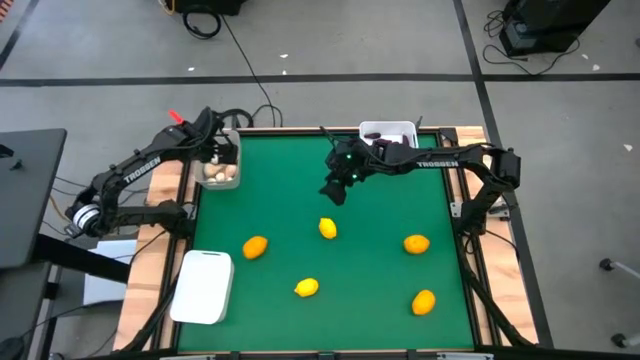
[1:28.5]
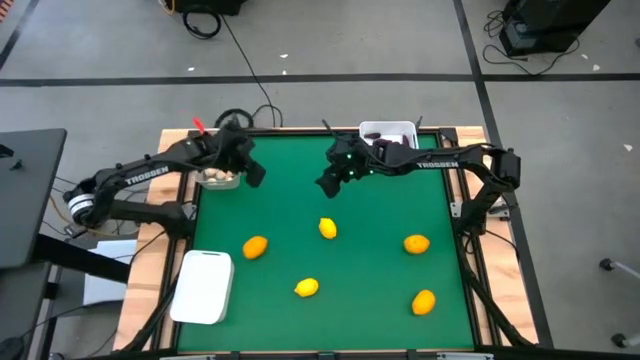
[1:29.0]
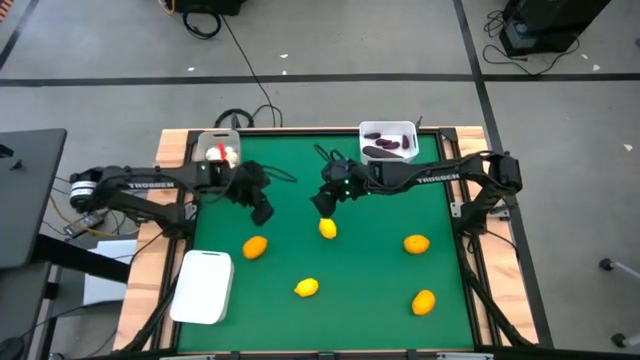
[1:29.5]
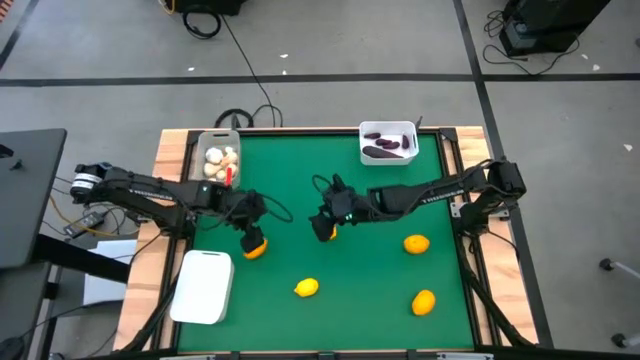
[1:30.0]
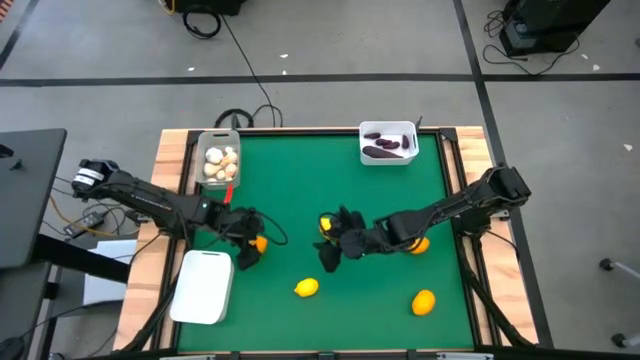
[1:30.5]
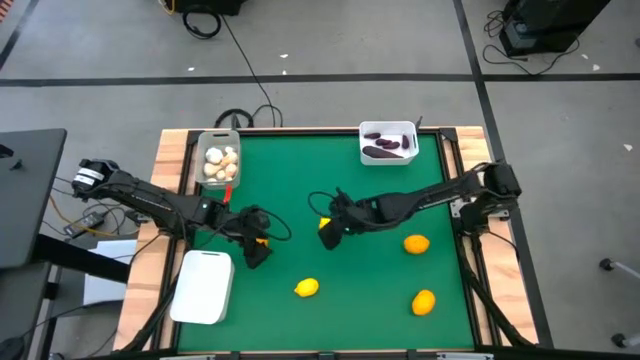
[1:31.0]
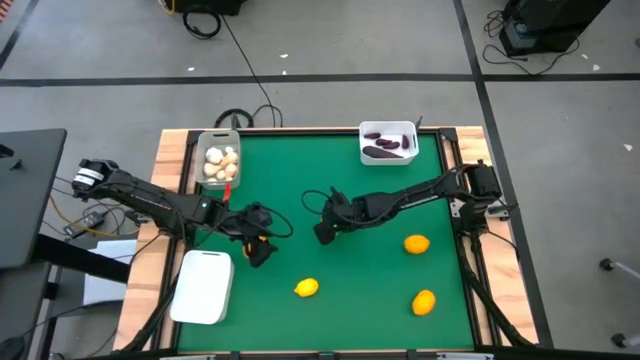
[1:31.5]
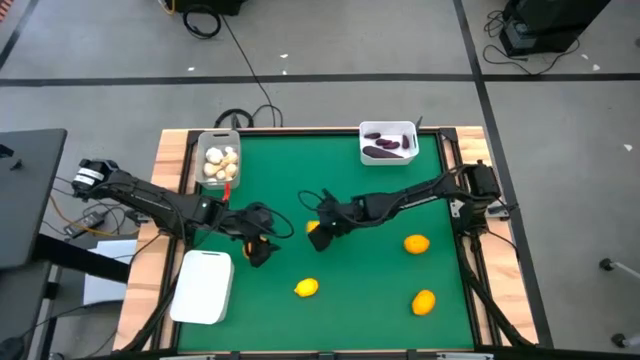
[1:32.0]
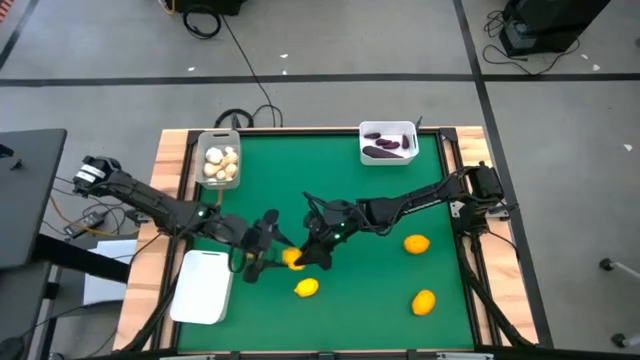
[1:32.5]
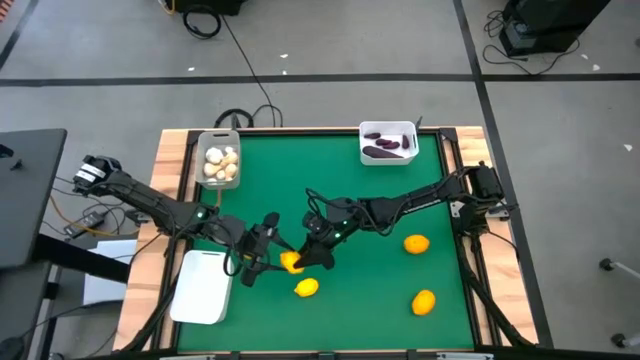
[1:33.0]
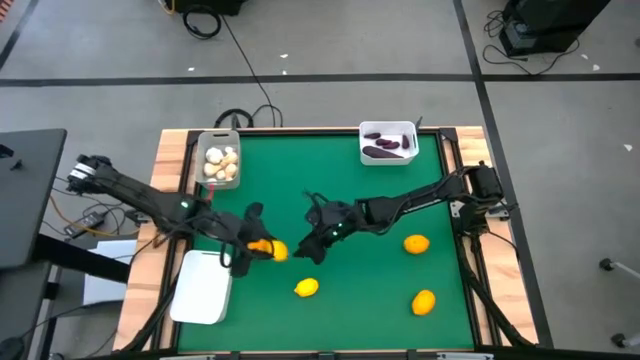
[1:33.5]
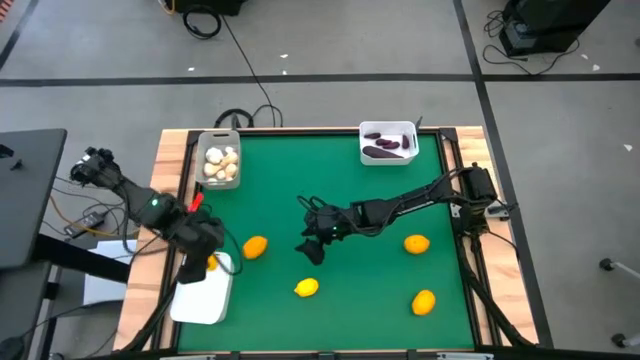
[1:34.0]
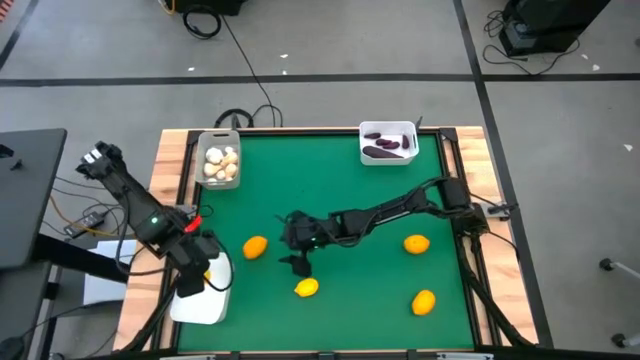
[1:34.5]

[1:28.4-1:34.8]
Task: Sort produce into baskets
Put the lemon into the bottom white bin

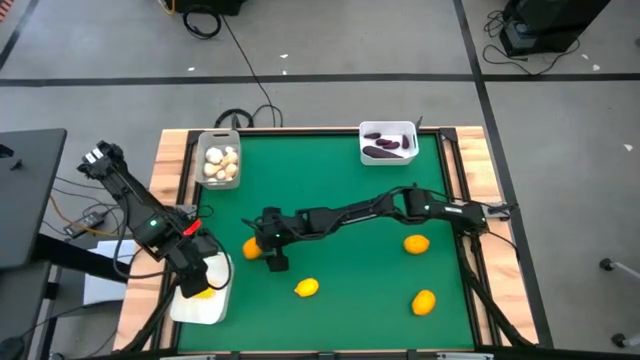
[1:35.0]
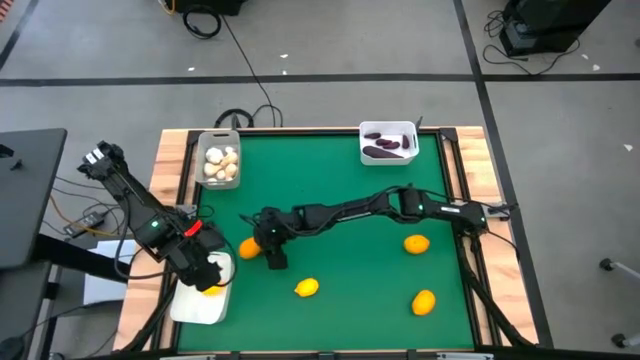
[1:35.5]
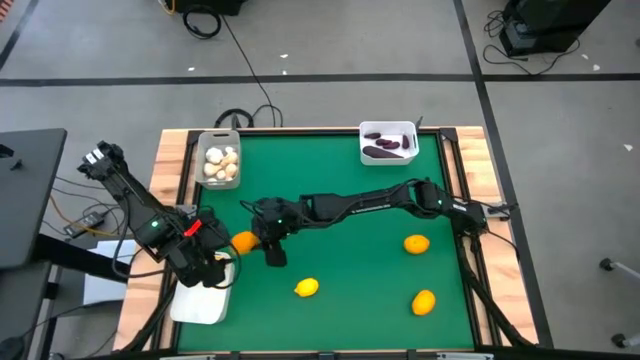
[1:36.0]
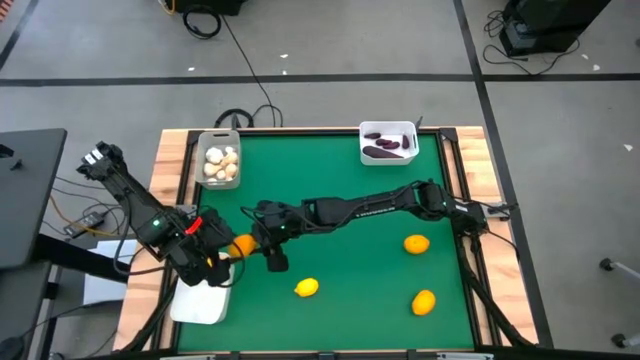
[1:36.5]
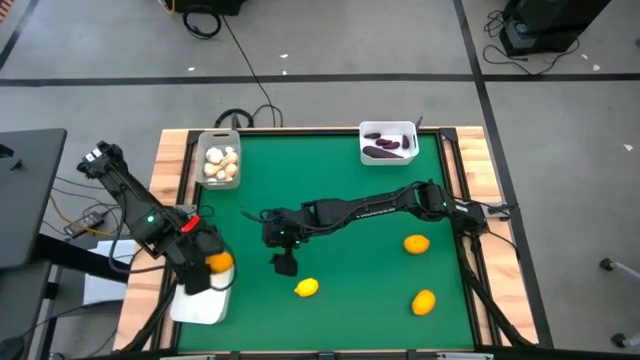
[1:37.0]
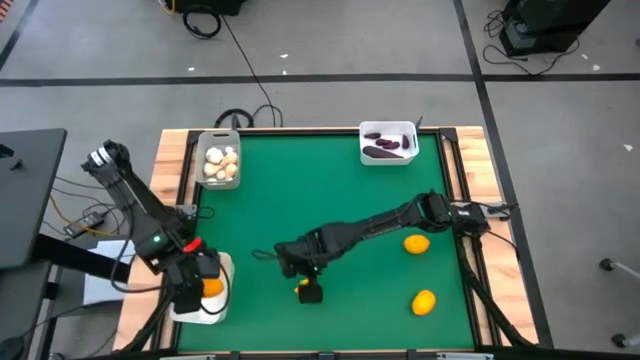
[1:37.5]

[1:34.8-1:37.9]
Put the lemon into the bottom white bin

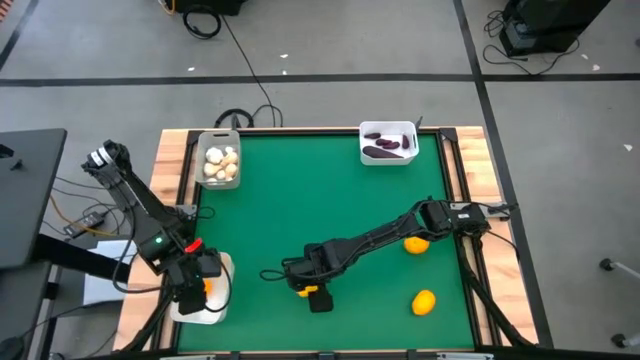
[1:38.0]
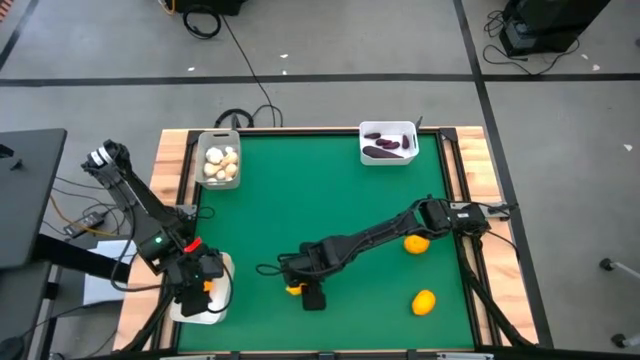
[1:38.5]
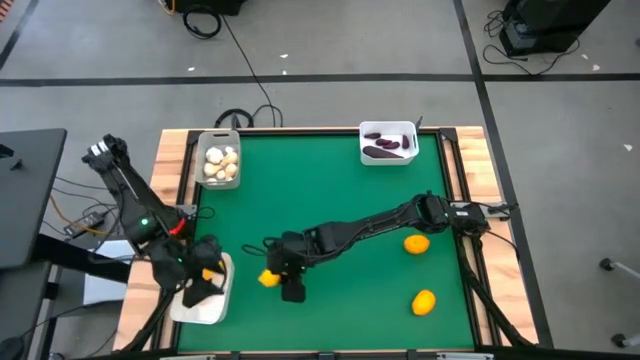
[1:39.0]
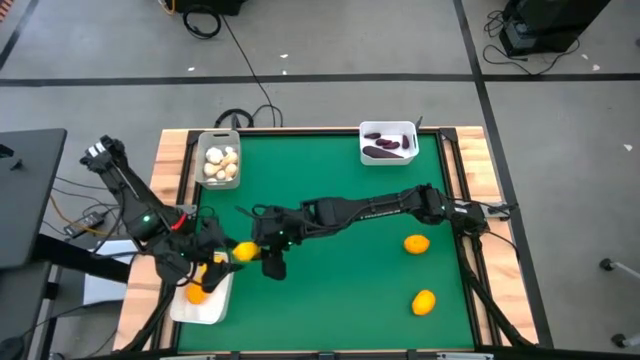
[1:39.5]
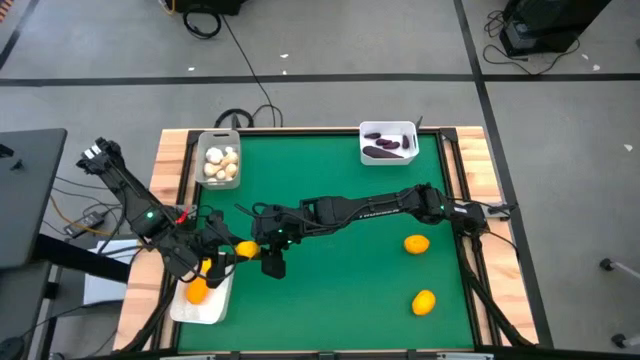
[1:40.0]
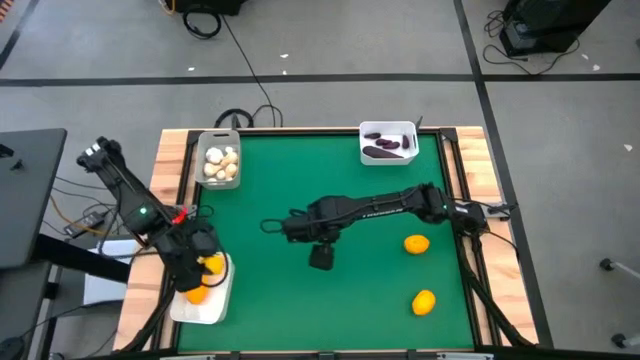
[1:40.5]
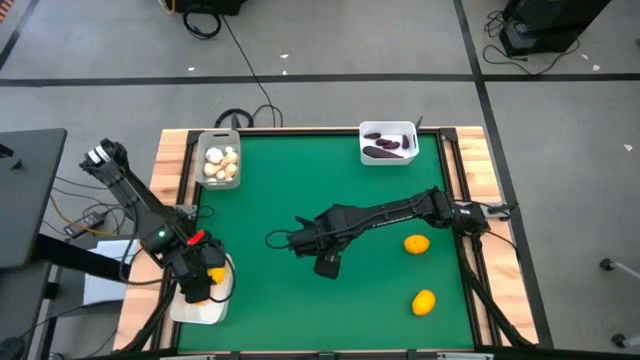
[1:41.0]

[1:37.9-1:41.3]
Put the lemon into the bottom white bin

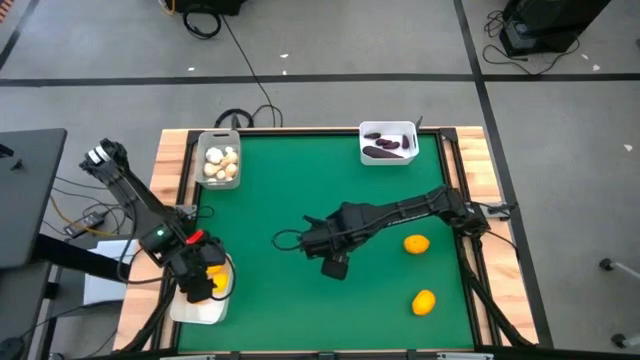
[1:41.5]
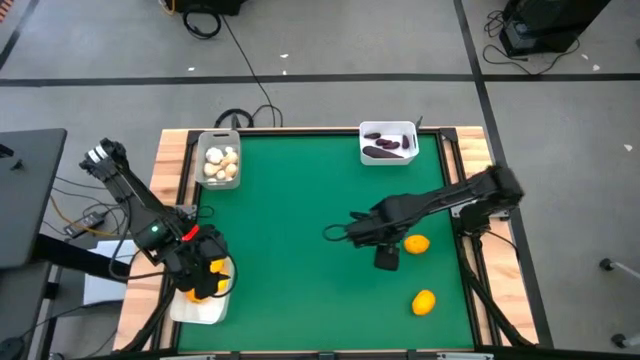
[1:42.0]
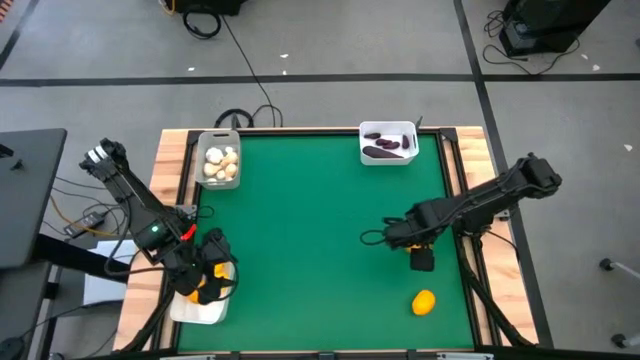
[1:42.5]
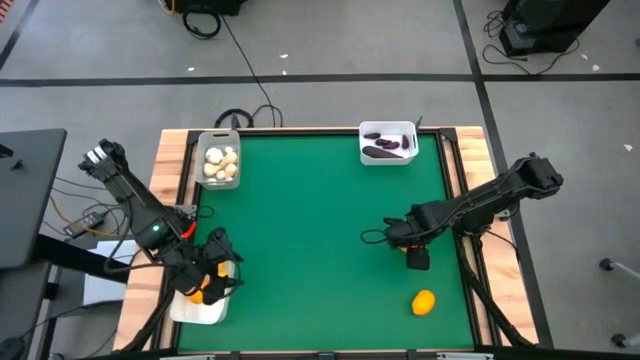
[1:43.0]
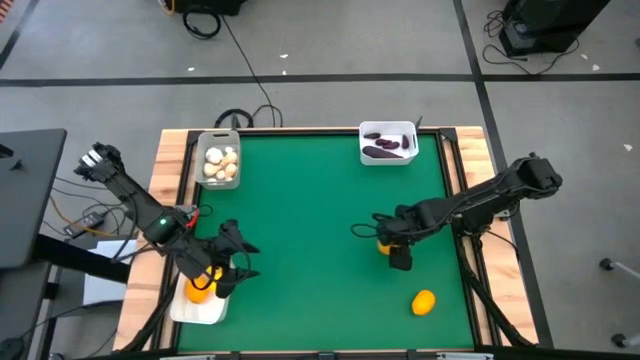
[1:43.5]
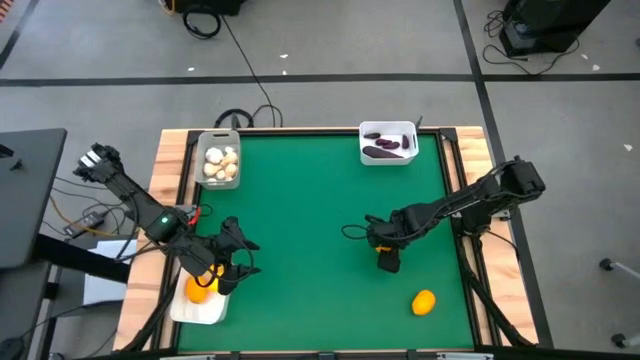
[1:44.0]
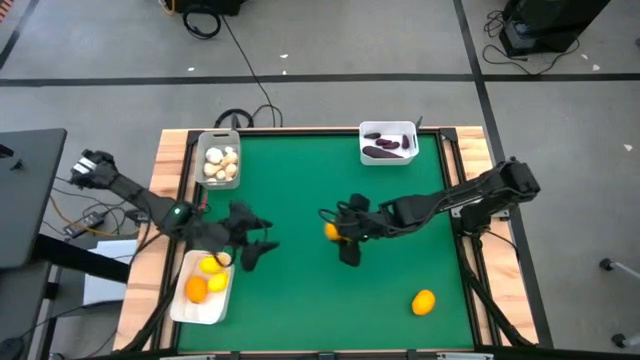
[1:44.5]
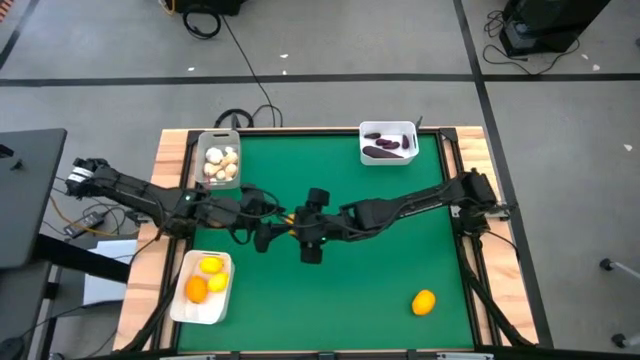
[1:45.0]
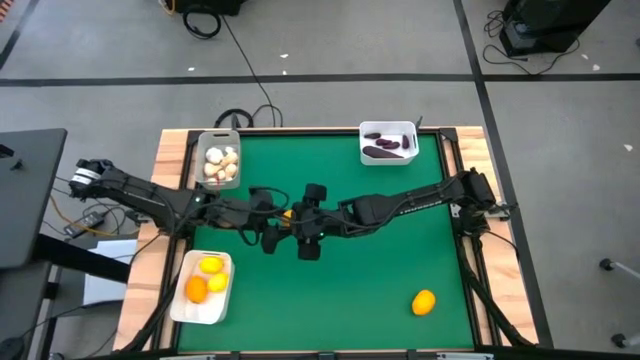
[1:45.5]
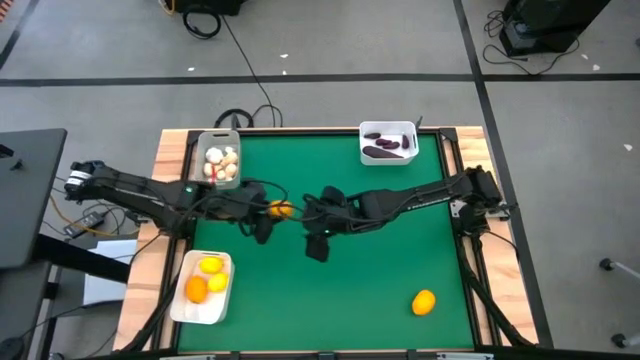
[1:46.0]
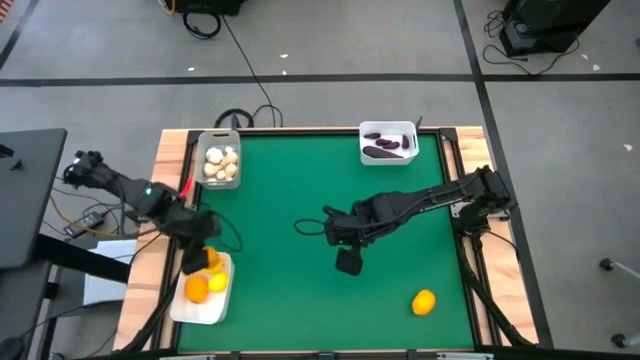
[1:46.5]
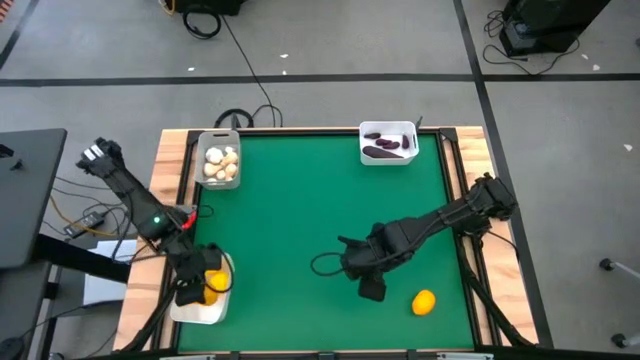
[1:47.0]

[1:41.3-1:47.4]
Put the lemon into the bottom white bin

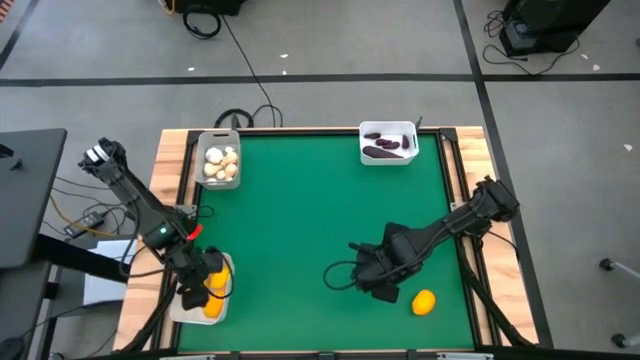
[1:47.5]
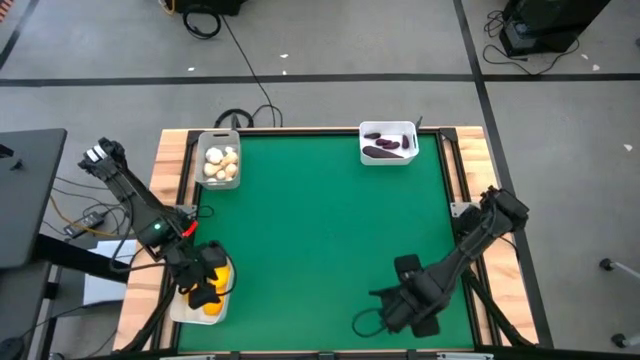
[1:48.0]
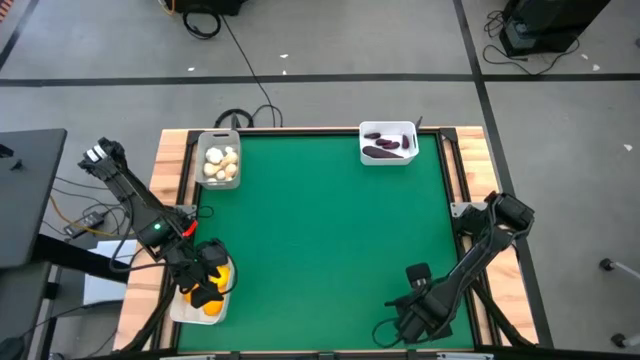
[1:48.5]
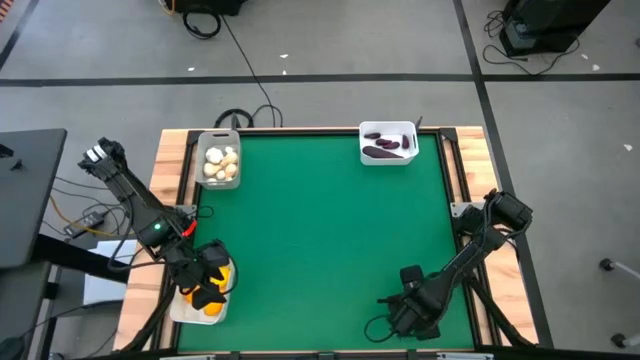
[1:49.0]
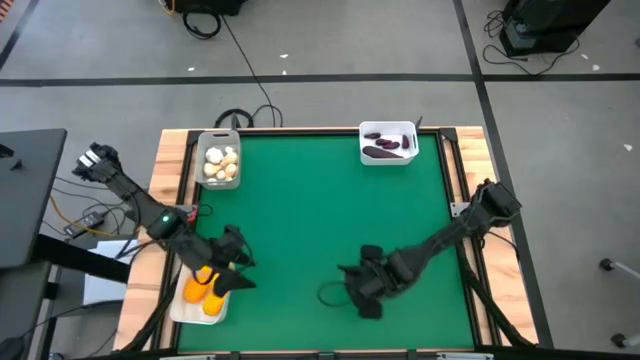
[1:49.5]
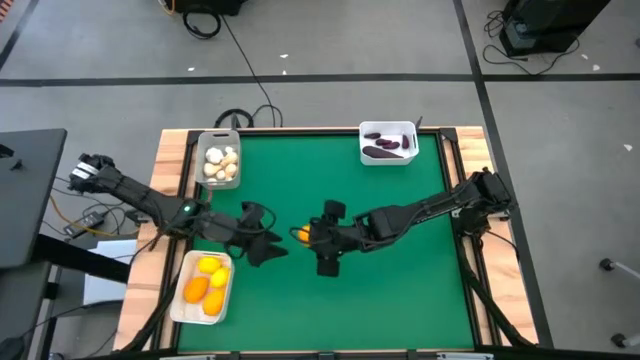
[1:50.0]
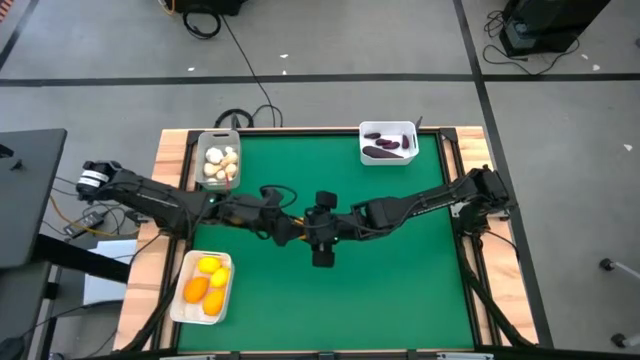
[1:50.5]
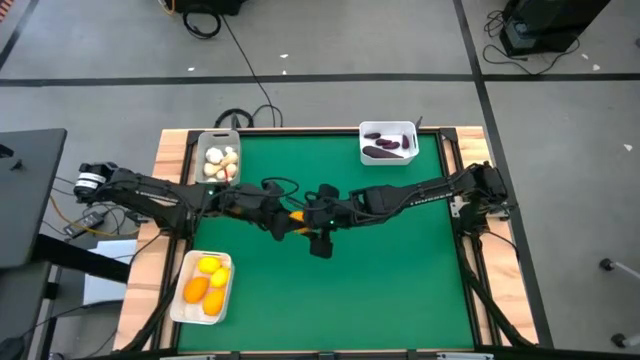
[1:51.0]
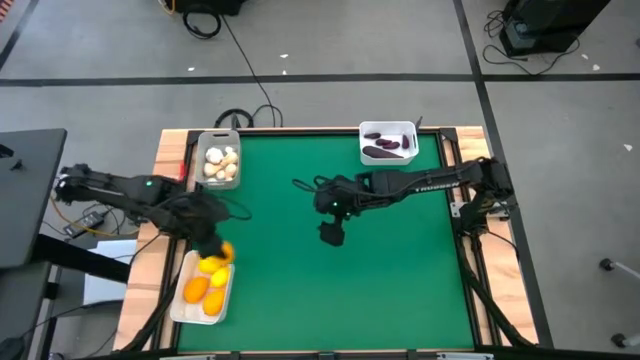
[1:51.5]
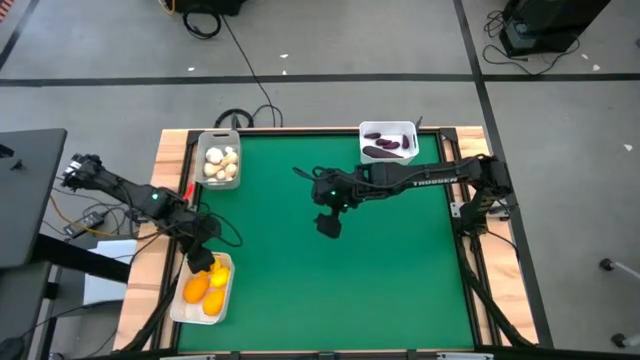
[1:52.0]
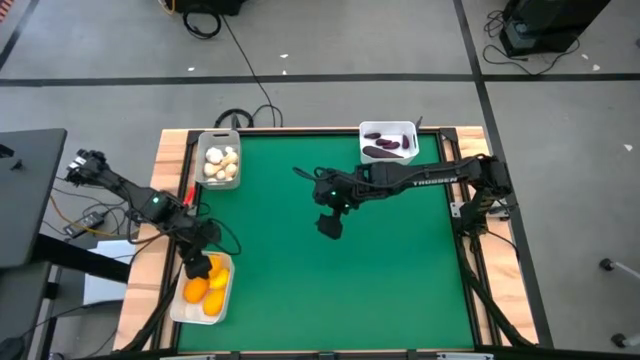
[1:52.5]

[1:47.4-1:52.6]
Put the lemon into the bottom white bin
